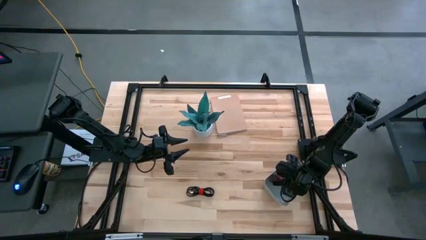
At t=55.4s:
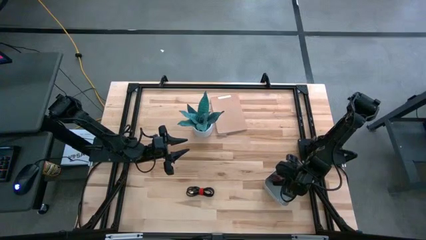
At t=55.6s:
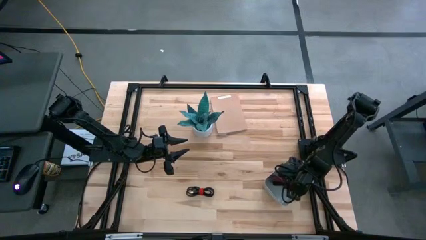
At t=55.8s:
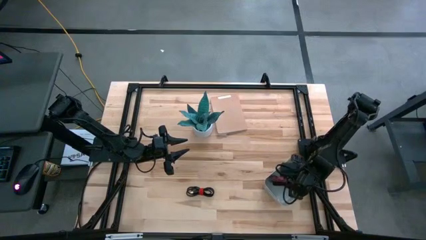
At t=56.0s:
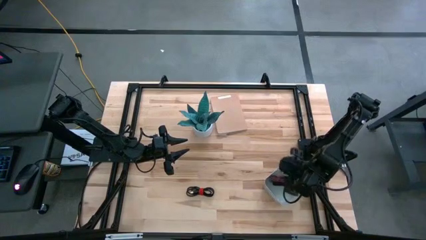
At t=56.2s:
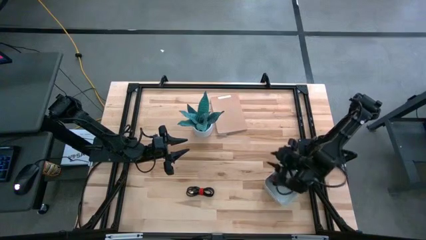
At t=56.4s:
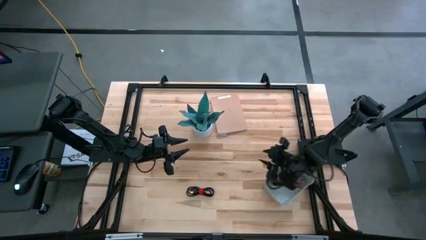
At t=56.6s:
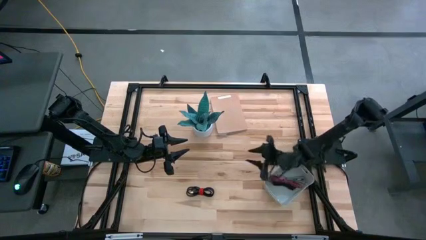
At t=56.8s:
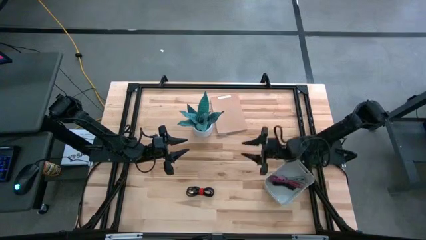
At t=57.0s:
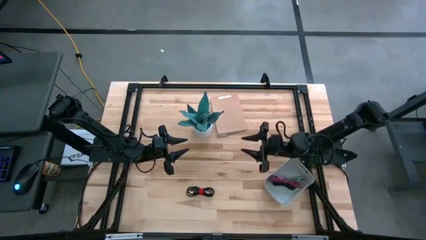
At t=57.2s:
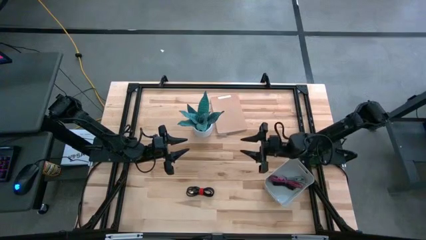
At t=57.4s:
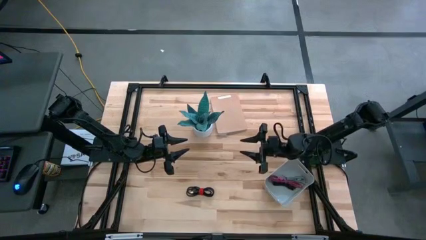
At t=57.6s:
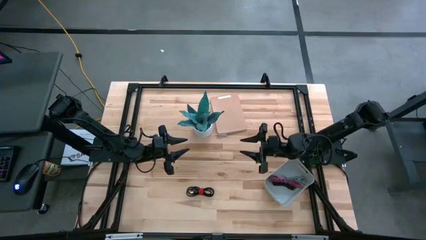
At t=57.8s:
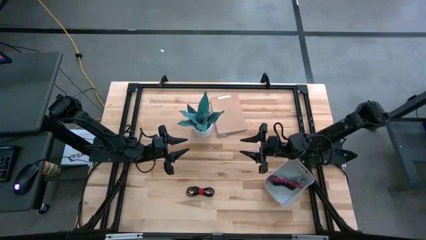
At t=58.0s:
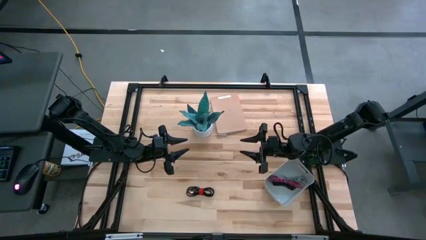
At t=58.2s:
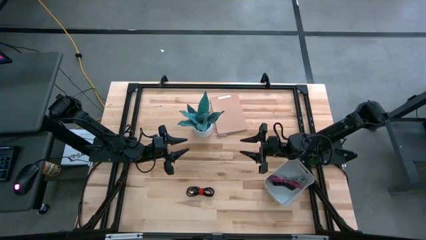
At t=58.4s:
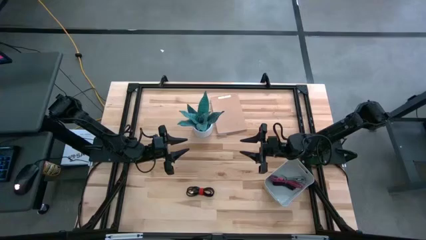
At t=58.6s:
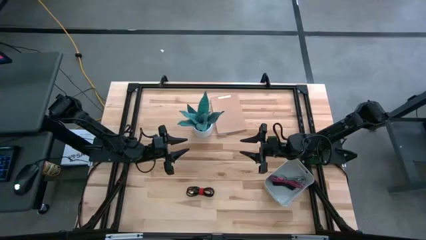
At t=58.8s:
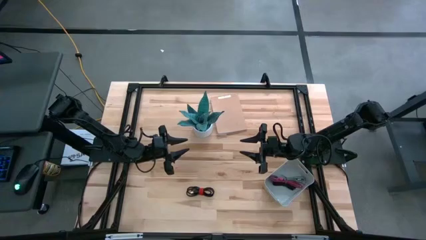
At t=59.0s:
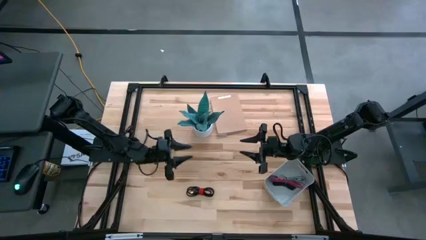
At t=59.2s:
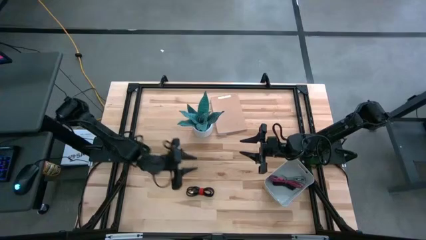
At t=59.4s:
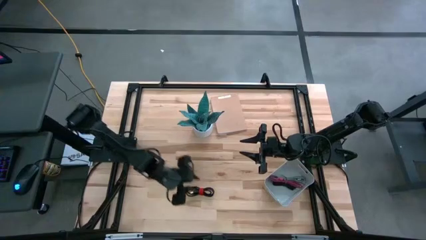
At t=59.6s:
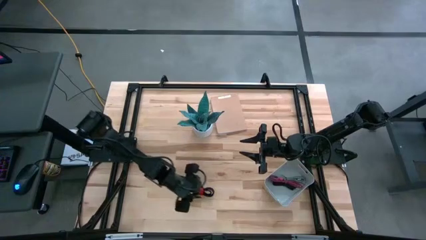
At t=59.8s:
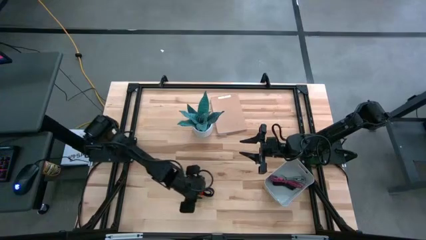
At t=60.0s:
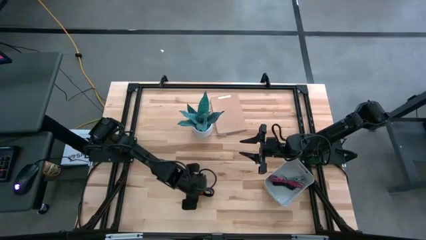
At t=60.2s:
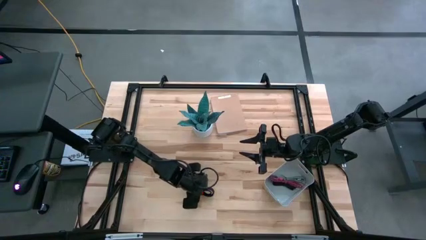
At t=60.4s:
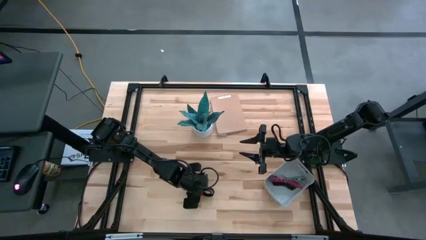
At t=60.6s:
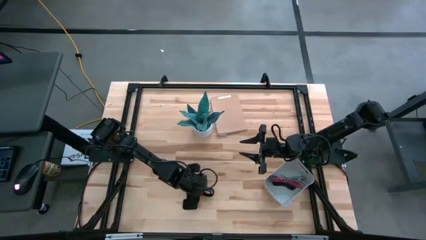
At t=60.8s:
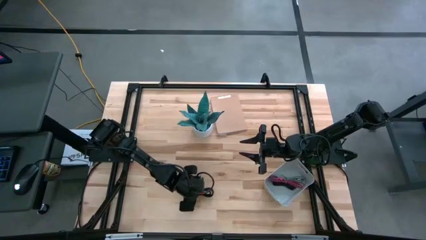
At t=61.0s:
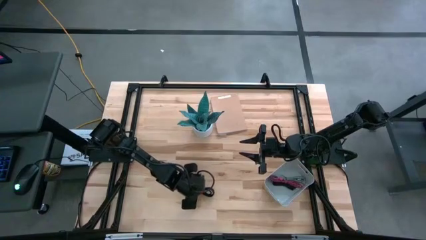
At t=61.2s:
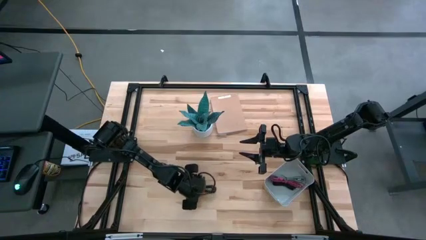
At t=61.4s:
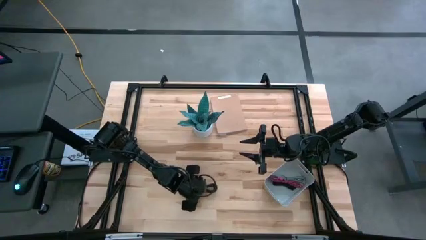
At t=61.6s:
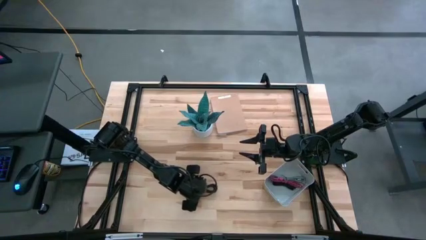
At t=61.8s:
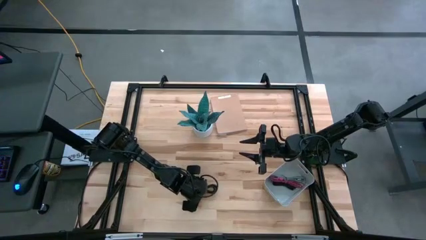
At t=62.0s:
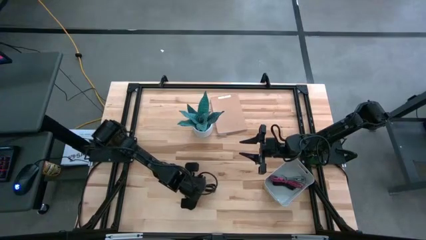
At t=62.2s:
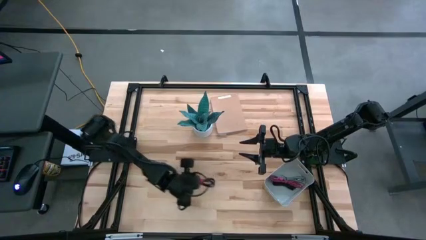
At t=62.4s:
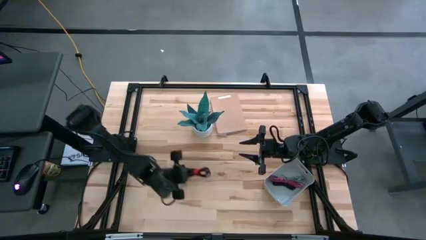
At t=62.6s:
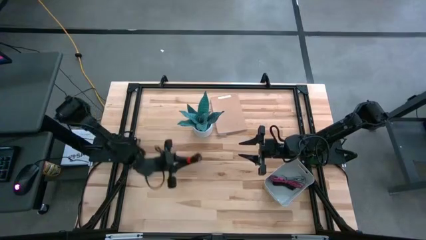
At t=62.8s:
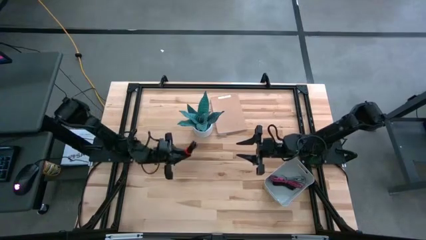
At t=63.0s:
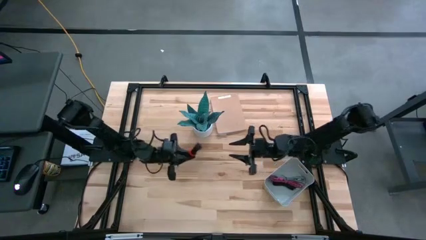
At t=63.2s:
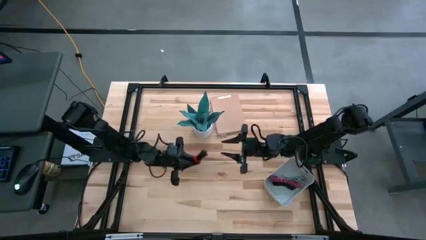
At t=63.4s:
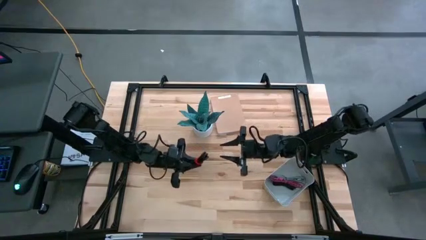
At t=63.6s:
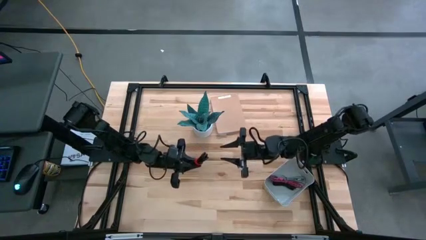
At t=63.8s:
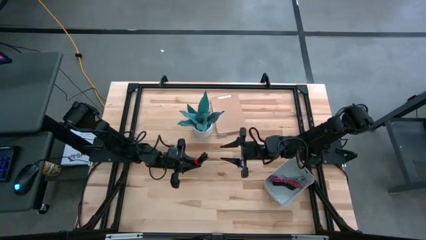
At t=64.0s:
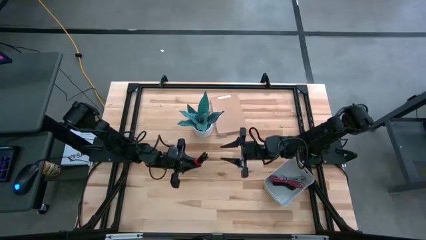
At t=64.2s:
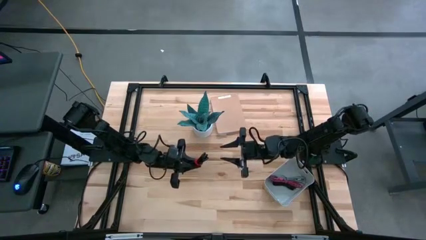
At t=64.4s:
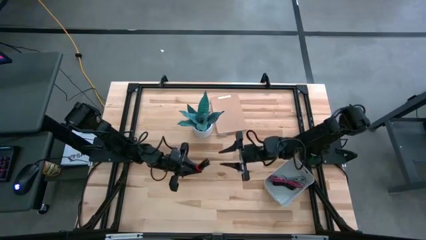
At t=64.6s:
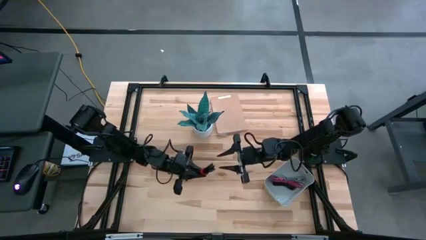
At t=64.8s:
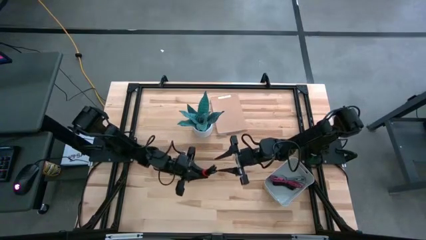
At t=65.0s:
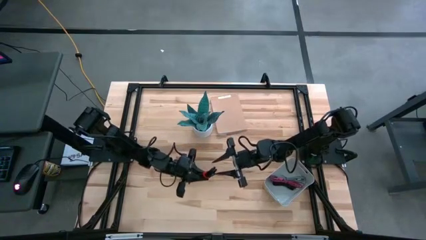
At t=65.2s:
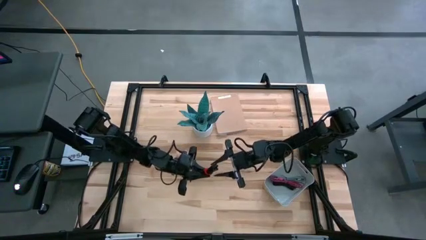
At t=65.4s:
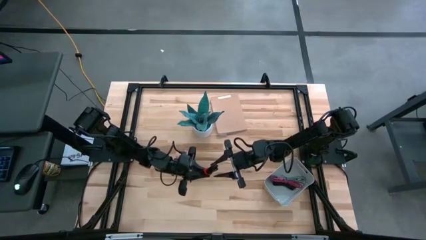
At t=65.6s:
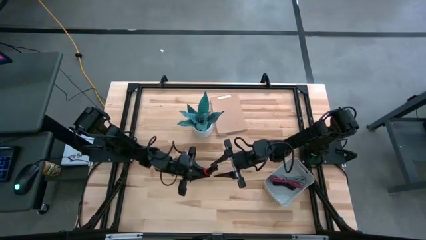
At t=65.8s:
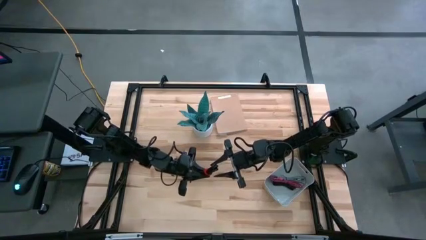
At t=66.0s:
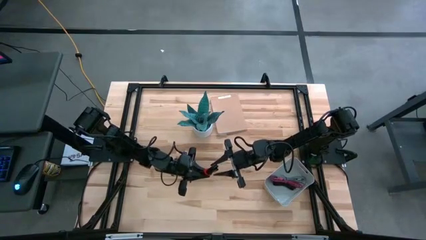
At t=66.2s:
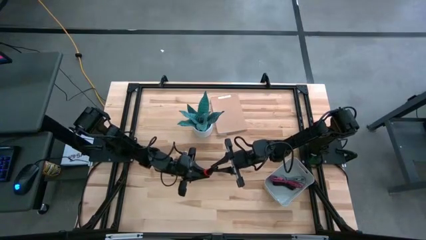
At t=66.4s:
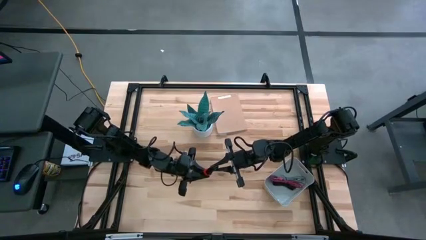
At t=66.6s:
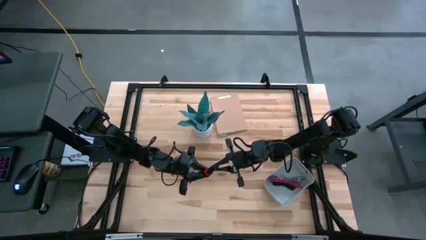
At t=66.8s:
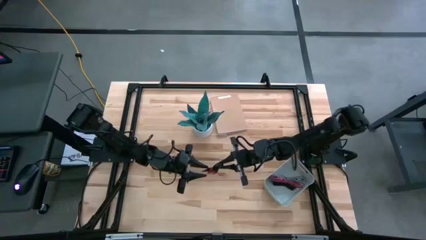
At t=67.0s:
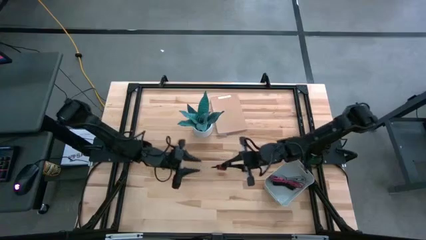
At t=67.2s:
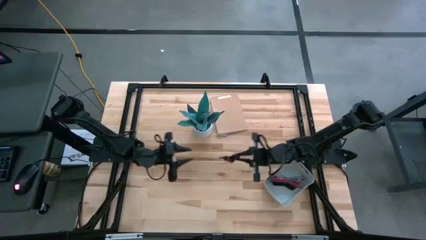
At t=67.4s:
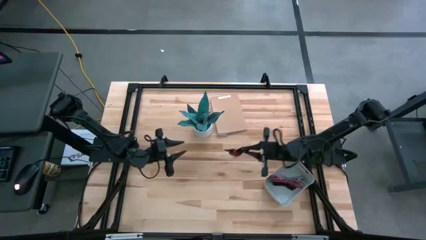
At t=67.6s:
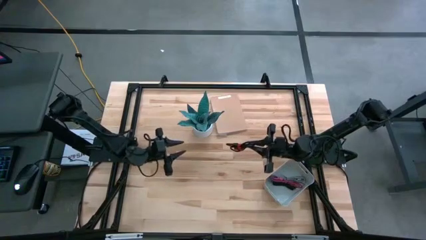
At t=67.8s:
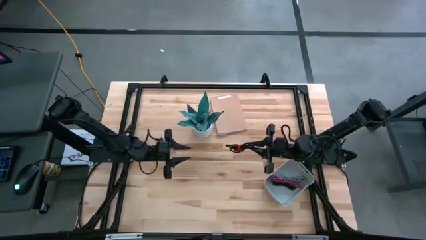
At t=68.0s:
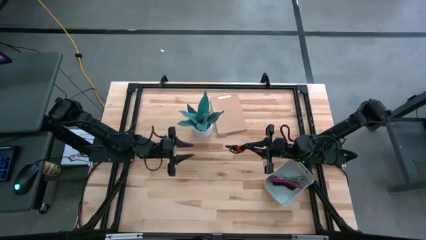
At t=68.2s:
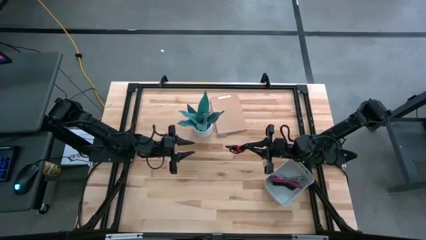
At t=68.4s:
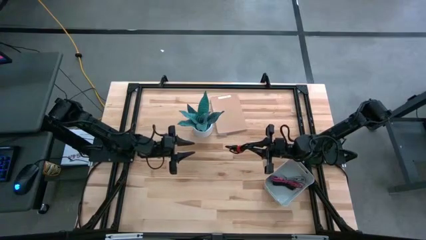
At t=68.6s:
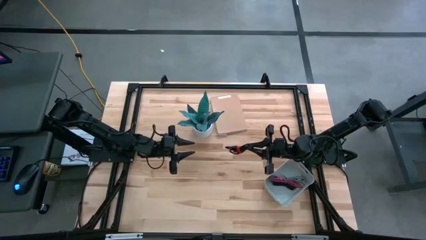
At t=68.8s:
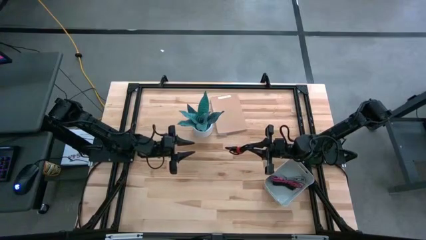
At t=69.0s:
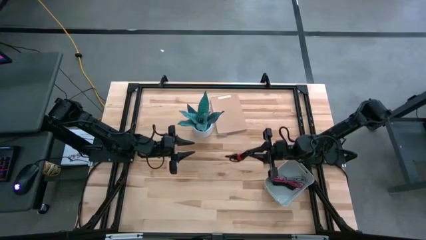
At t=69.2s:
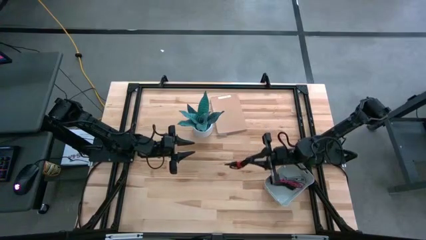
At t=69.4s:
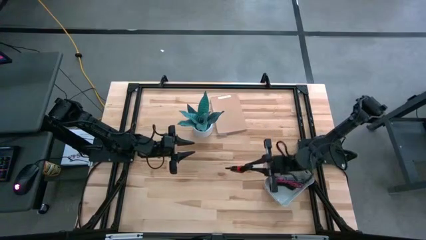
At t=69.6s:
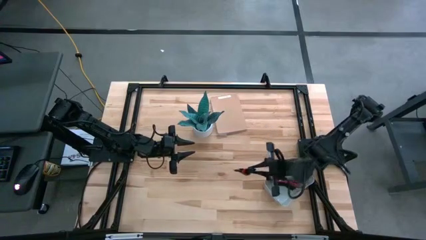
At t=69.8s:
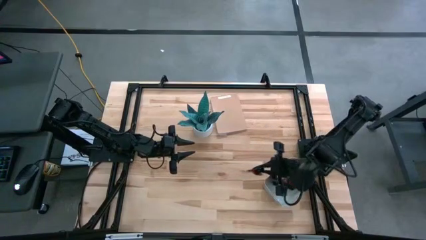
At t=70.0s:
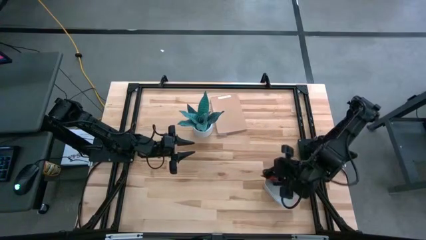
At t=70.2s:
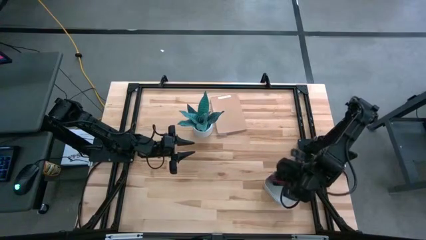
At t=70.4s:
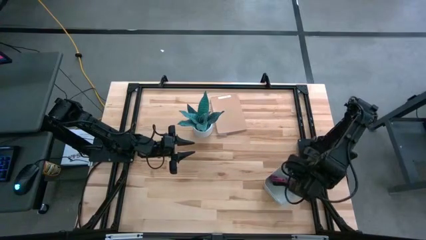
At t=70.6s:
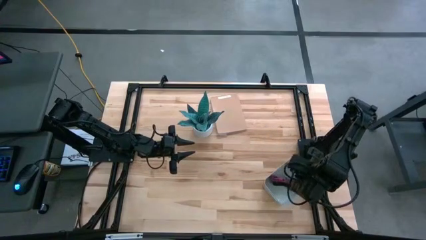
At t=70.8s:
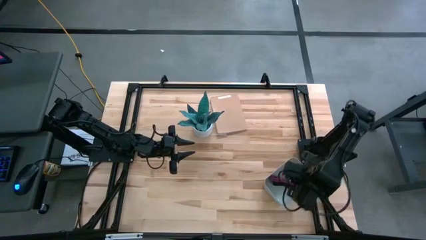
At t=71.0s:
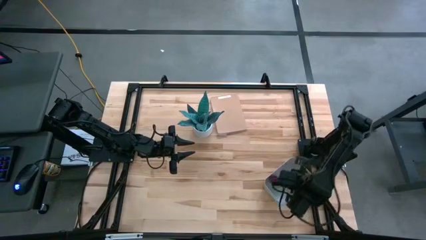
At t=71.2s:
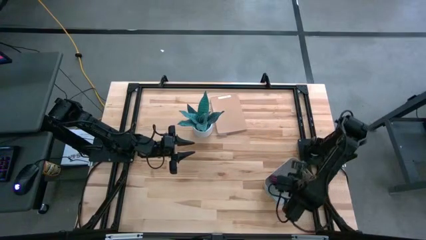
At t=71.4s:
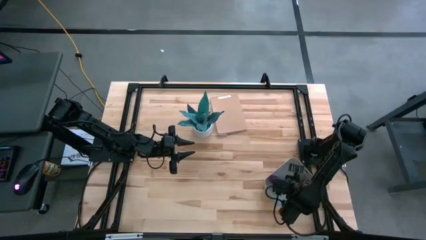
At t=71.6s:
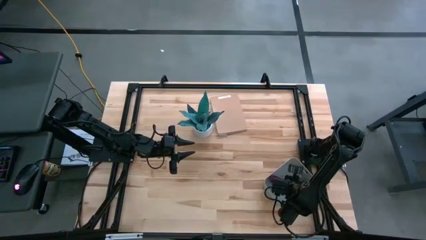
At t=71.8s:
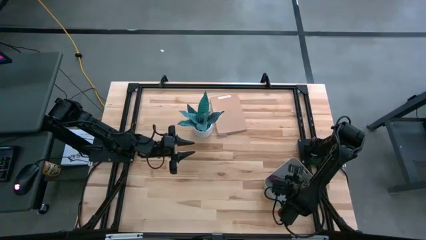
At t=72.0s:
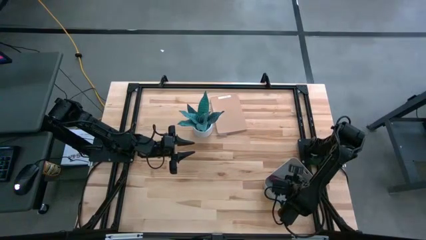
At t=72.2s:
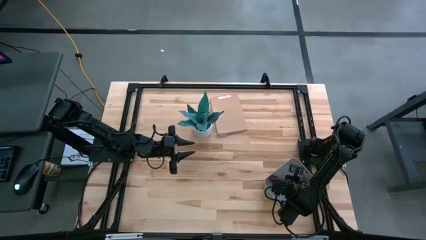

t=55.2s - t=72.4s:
Task: Pick and place USB-C Cables
Put the black charger cable into the white bin
